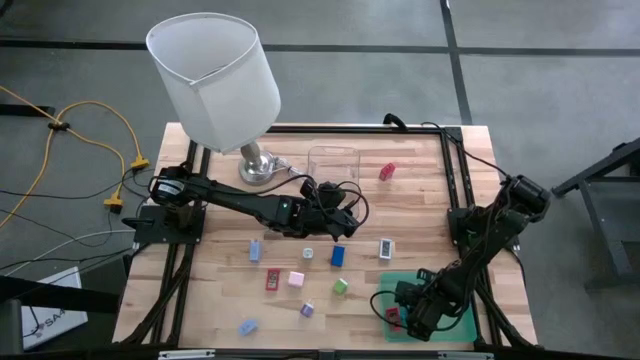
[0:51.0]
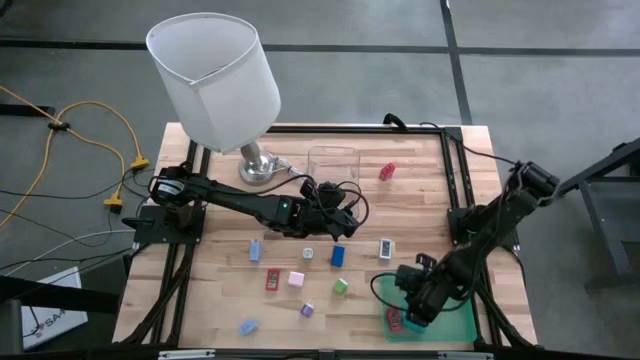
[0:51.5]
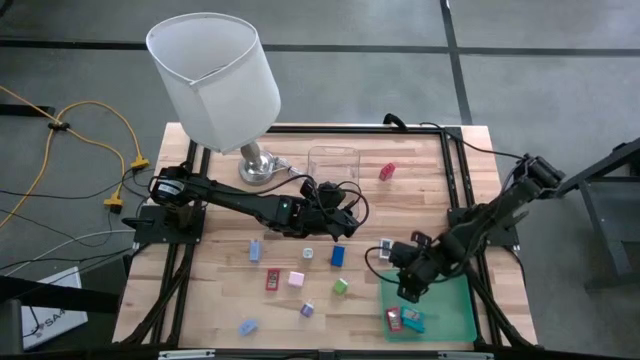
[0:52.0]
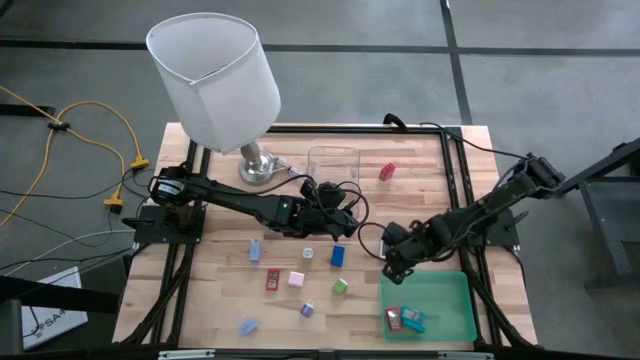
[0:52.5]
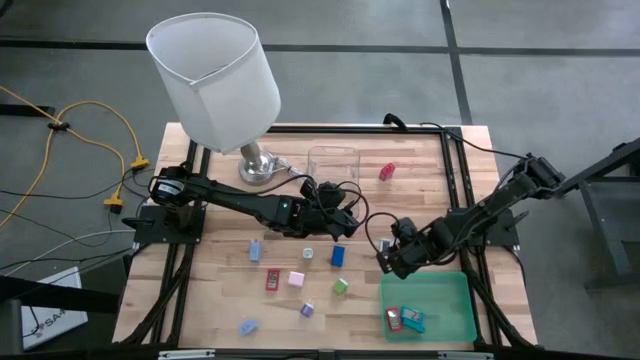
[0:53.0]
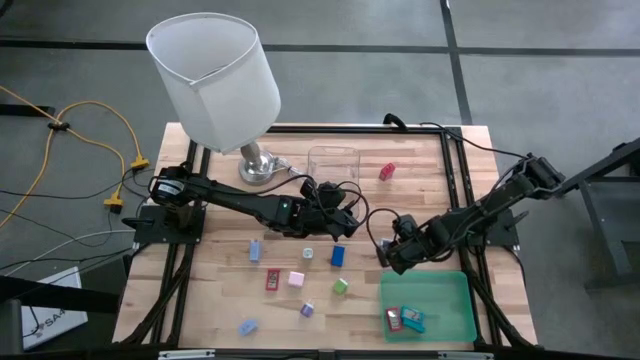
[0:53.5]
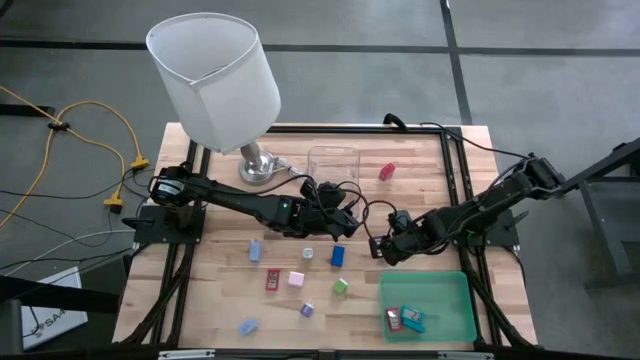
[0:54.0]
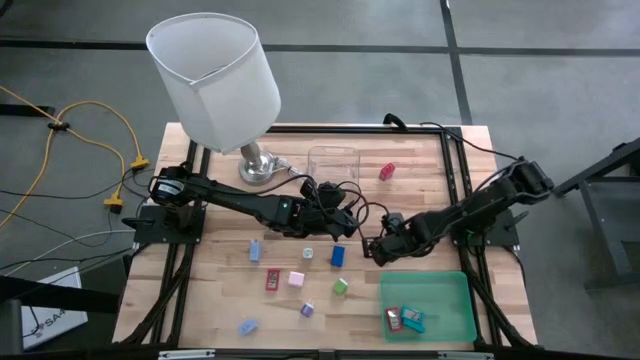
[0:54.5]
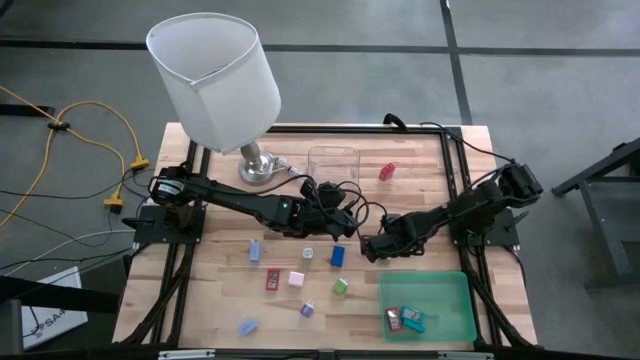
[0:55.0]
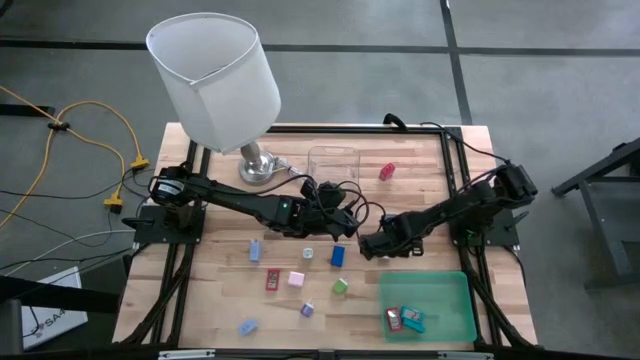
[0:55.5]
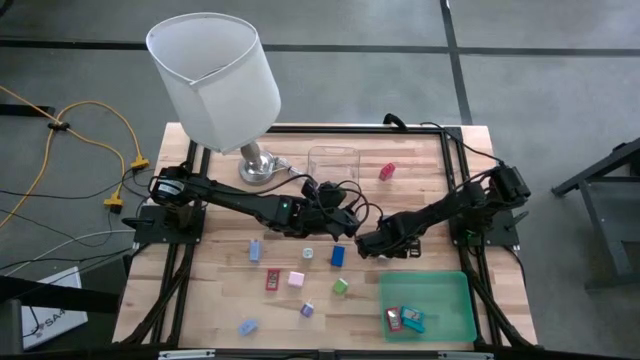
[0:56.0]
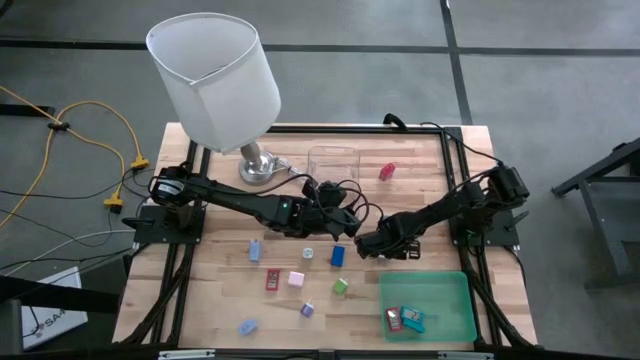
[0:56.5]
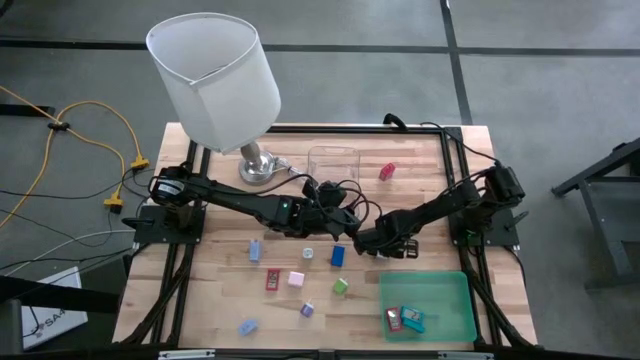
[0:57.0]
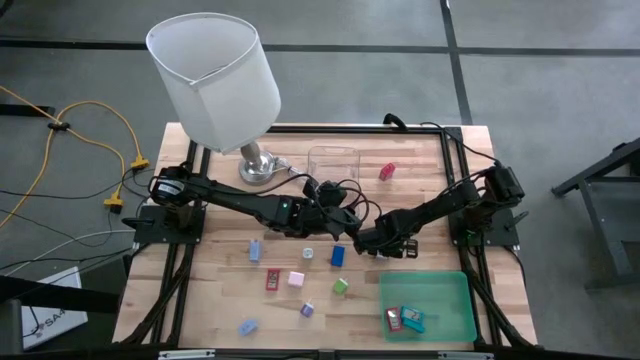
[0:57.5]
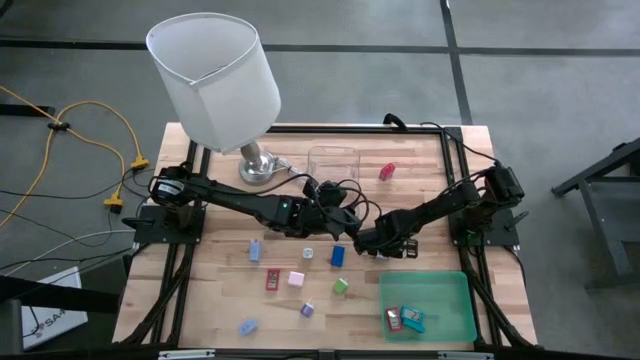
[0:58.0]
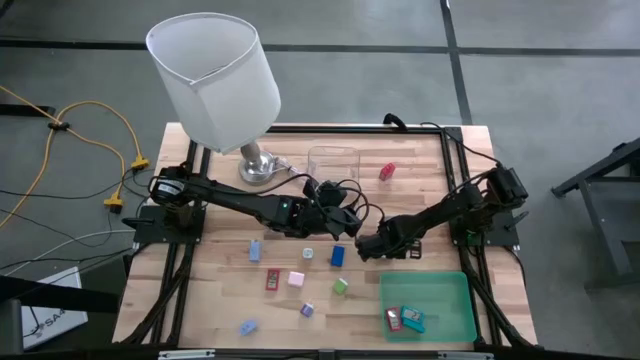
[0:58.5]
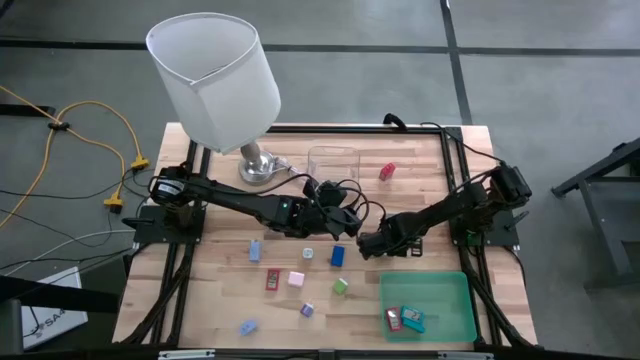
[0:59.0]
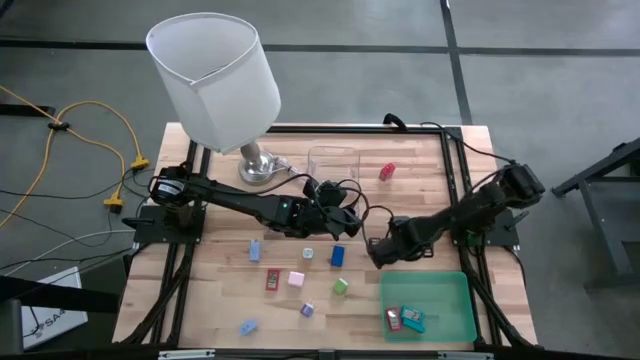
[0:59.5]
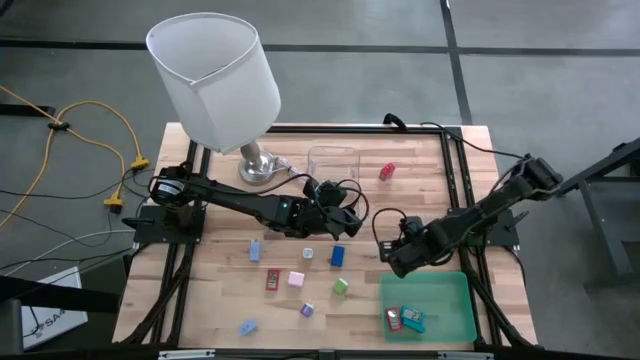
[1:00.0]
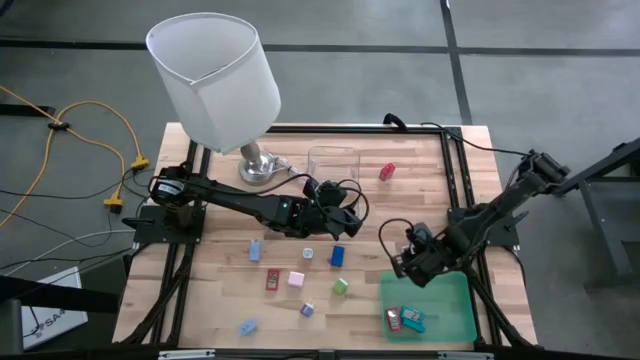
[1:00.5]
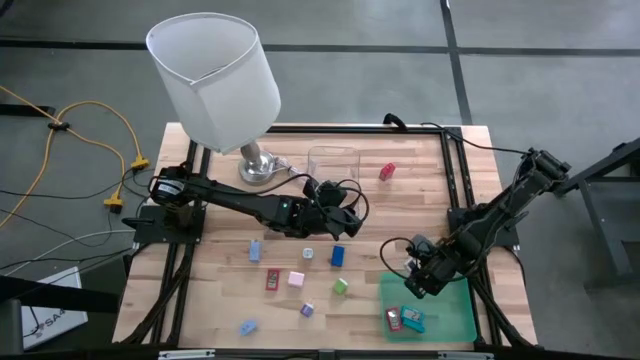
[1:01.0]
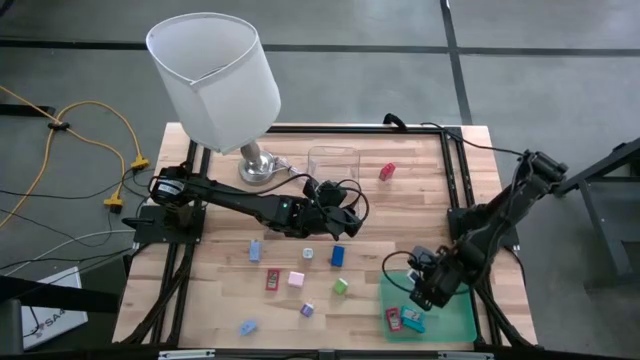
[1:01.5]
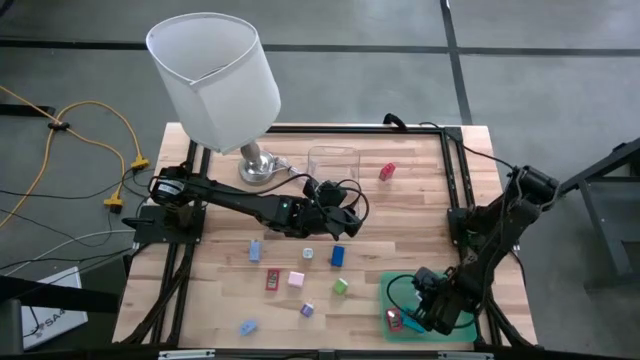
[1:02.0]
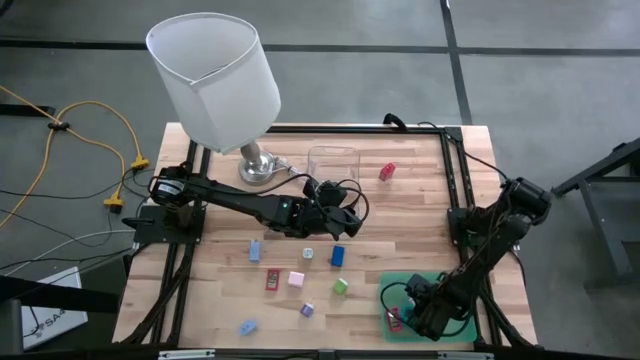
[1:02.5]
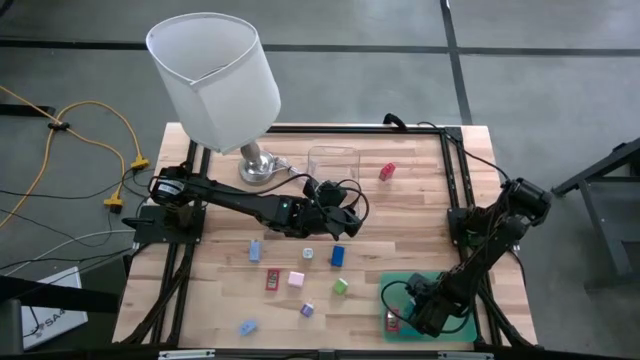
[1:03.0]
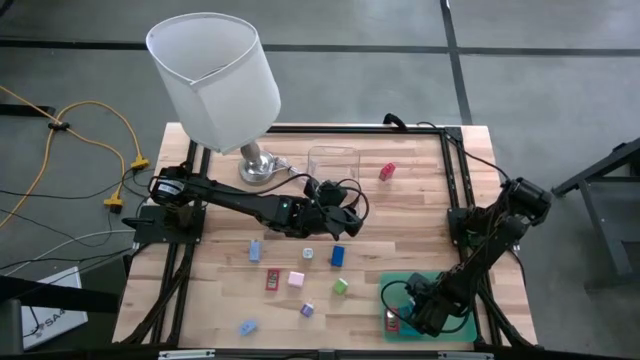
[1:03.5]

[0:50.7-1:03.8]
Task: Pick & Place Office items
Put the white digital clock into the green bin

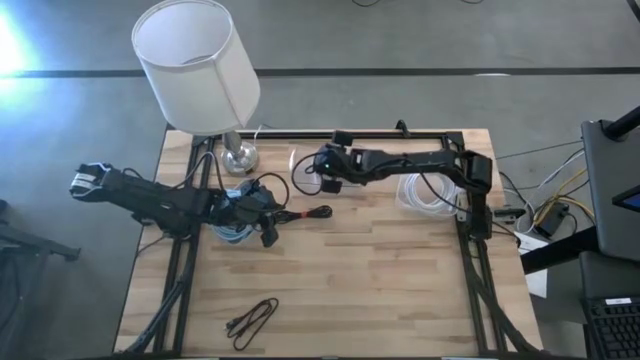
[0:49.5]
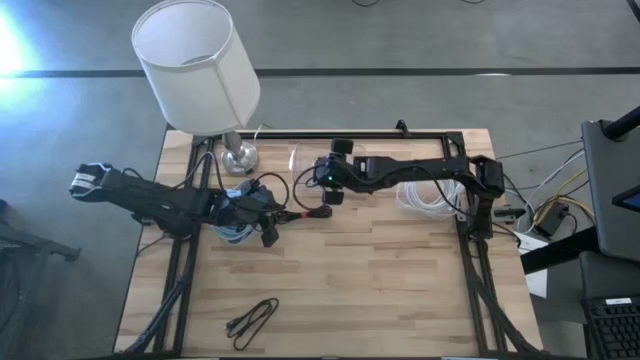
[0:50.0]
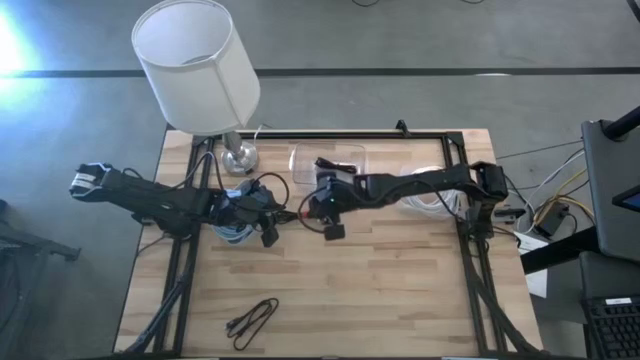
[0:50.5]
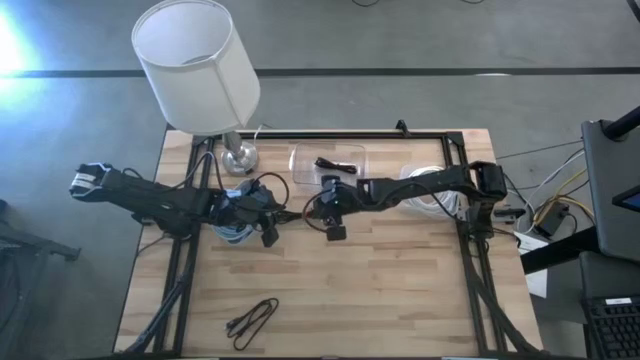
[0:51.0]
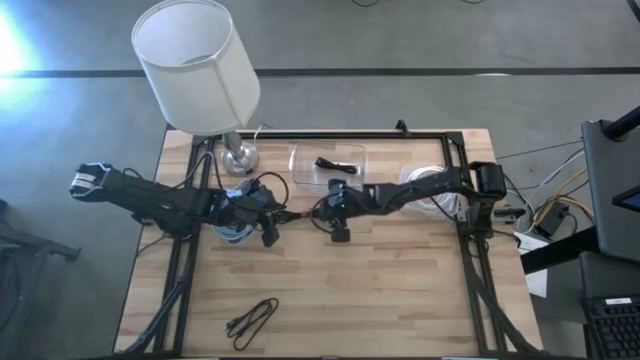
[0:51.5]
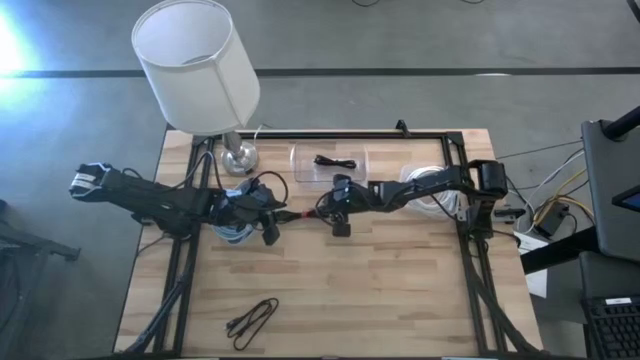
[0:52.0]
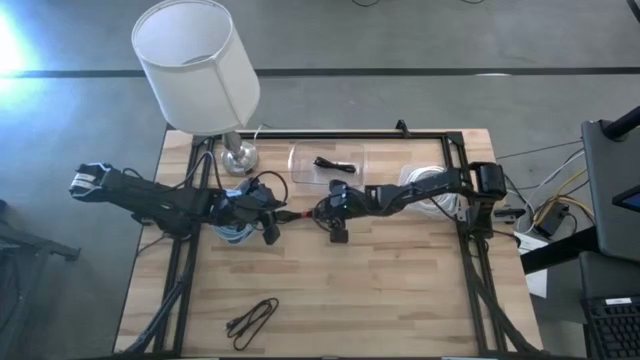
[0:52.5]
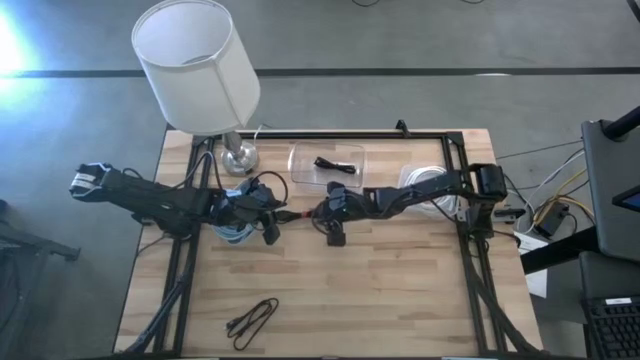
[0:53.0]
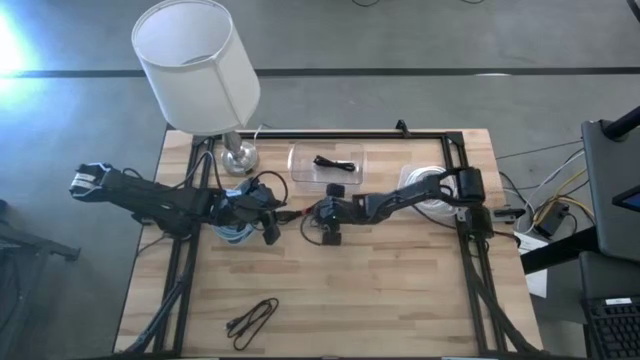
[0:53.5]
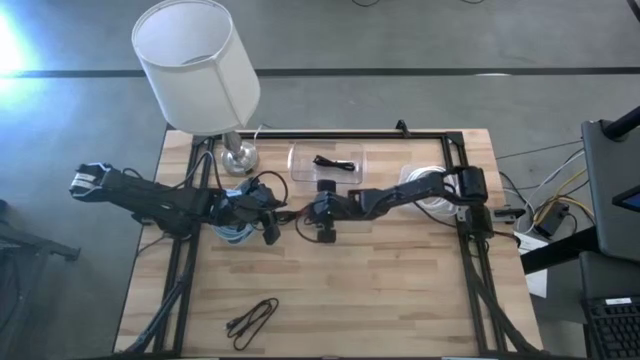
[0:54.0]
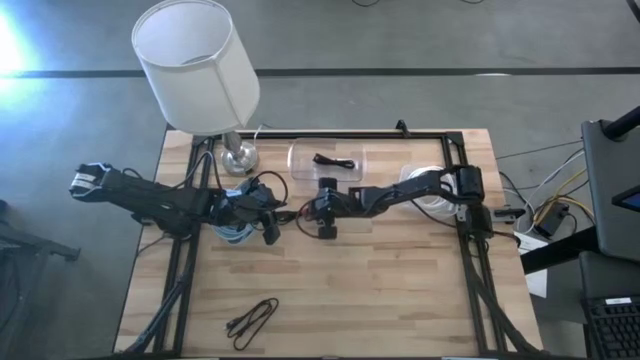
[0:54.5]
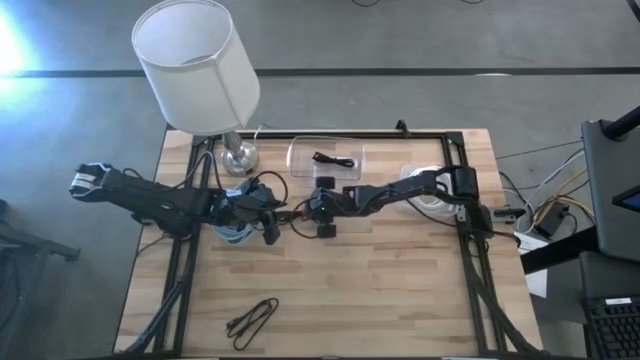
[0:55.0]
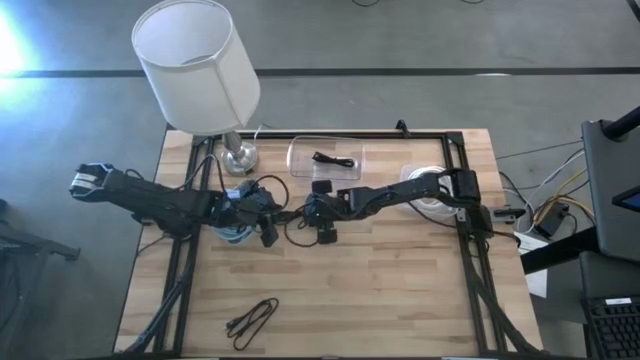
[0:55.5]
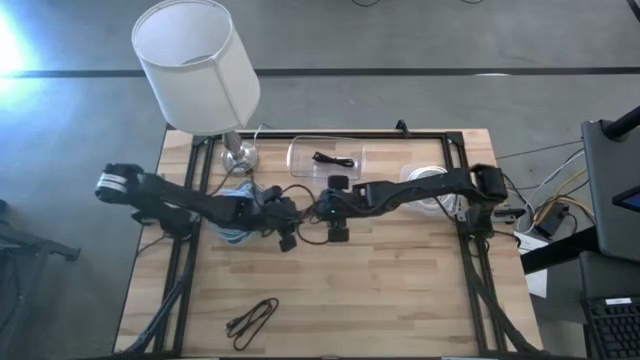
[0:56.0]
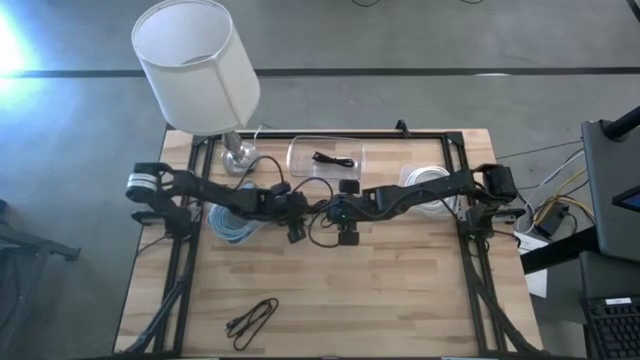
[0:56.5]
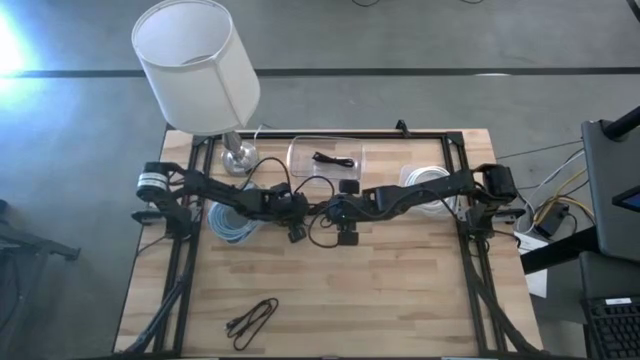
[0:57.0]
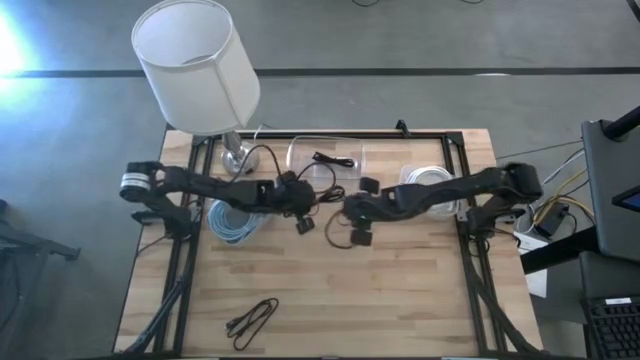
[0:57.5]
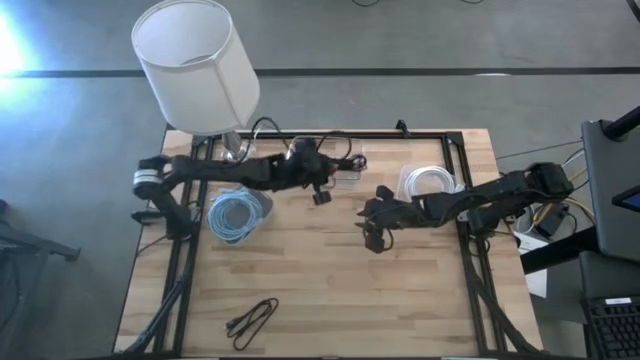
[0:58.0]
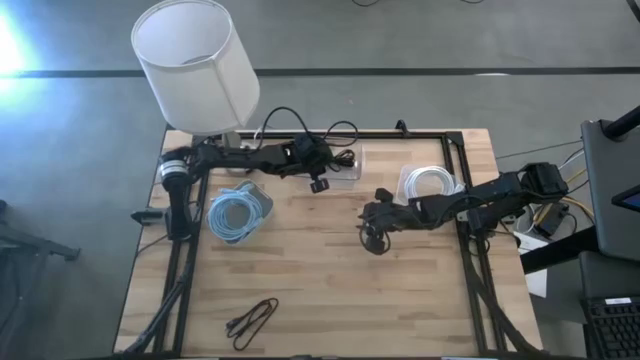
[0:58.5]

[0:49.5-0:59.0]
Task: Pick & Place USB Port
Put the top black USB cable into the left transparent bin
